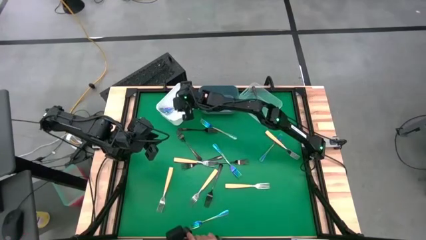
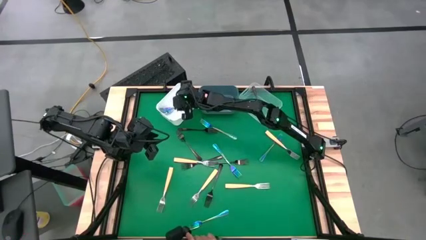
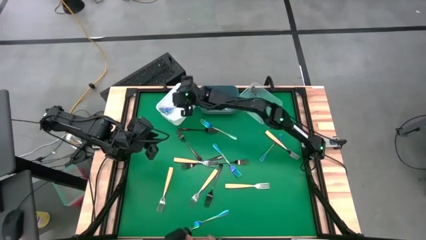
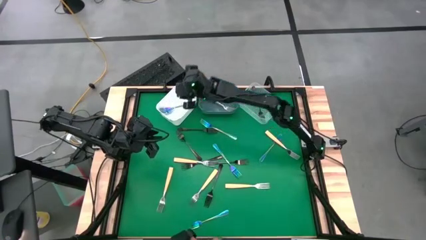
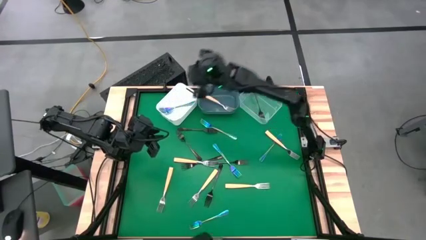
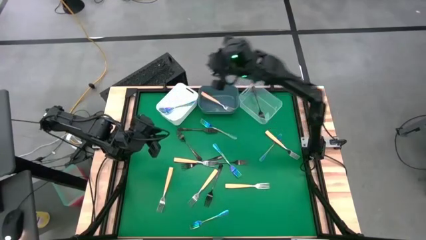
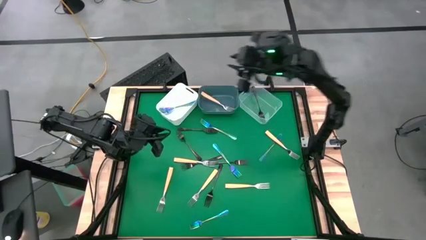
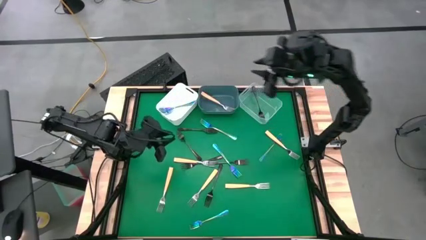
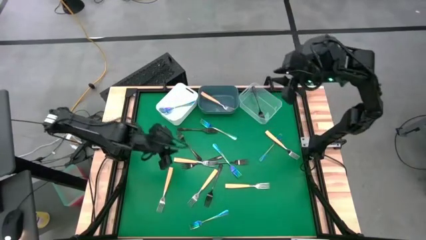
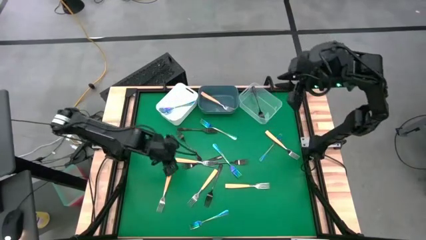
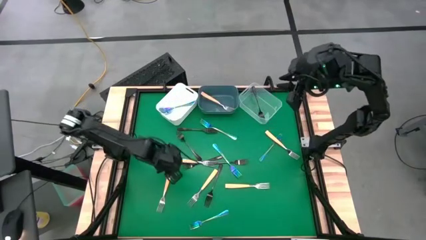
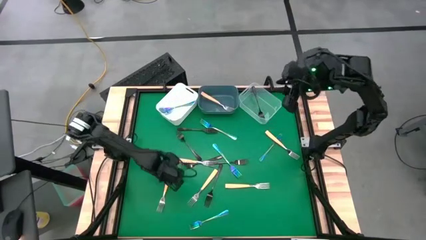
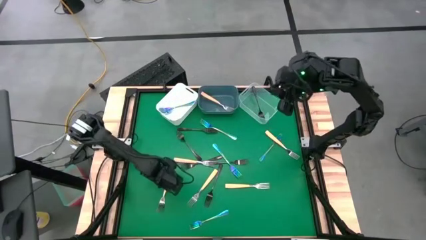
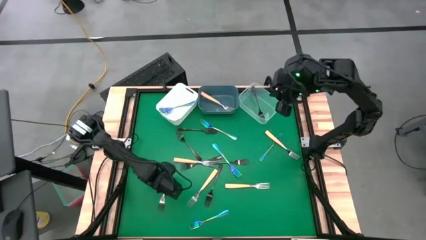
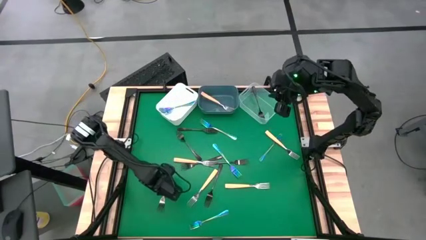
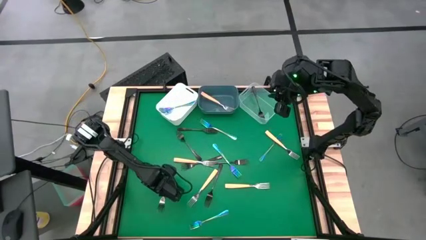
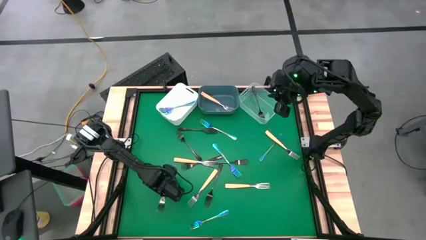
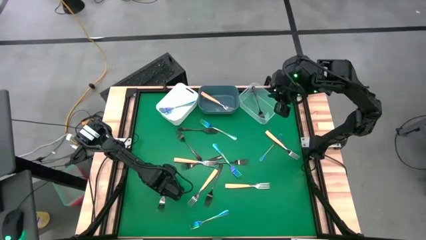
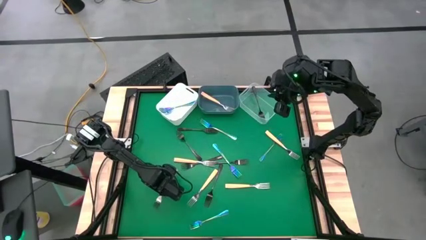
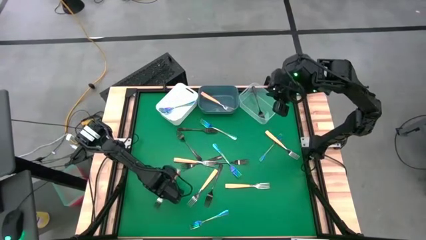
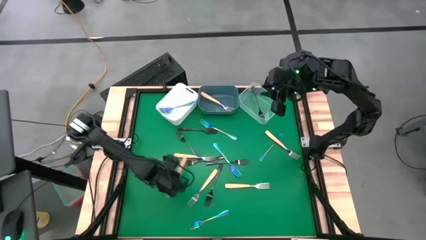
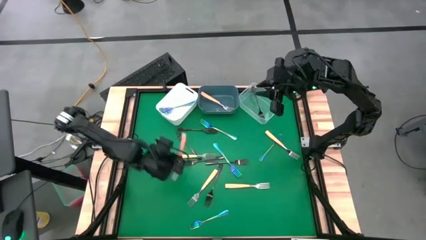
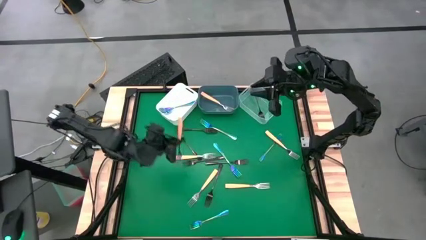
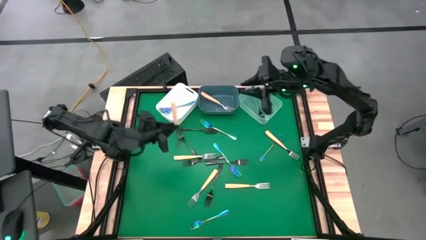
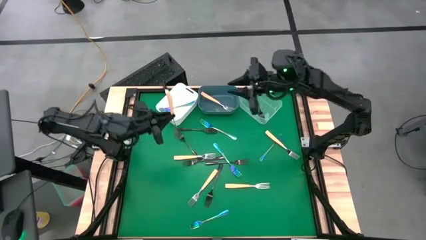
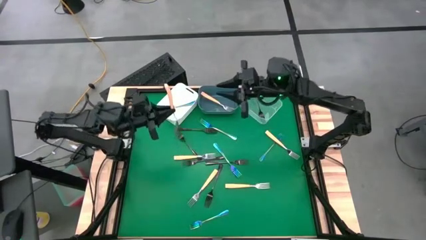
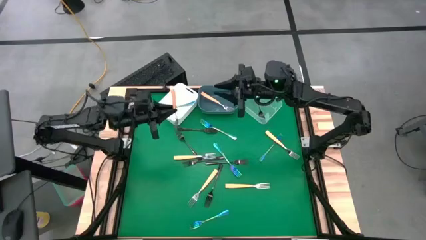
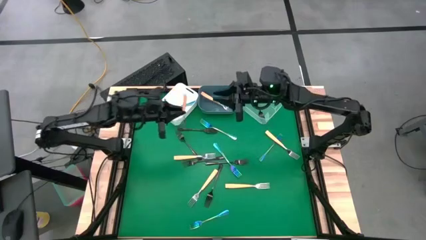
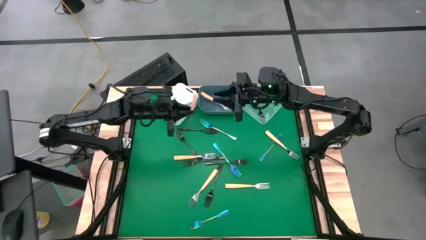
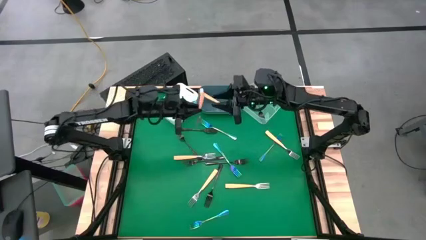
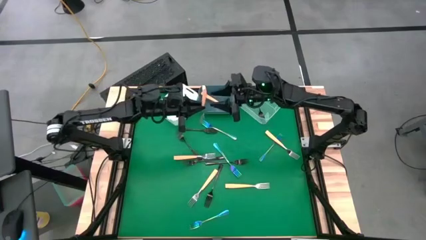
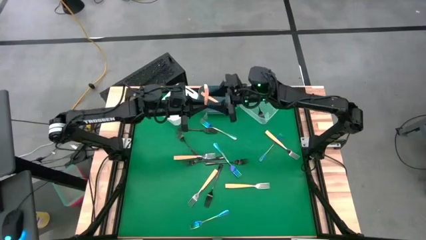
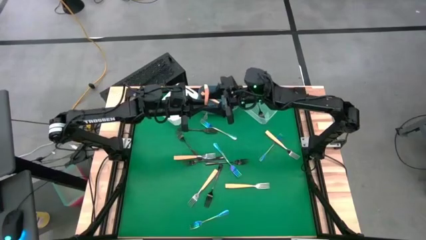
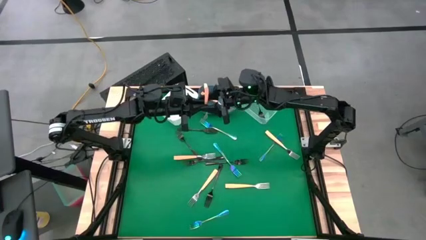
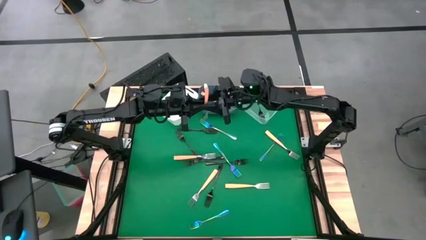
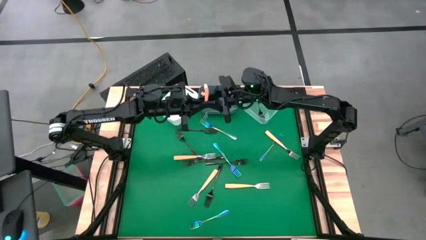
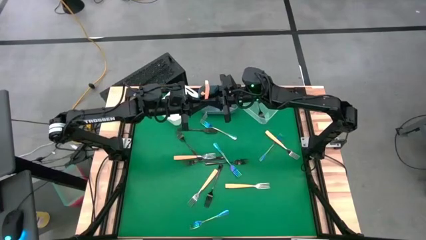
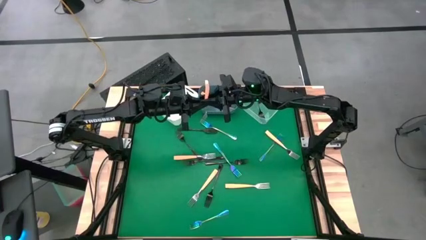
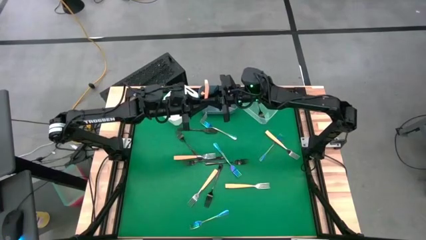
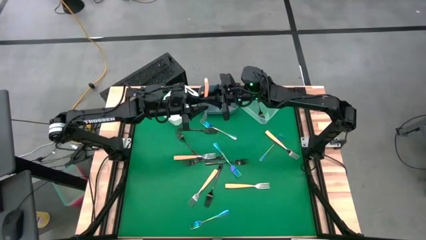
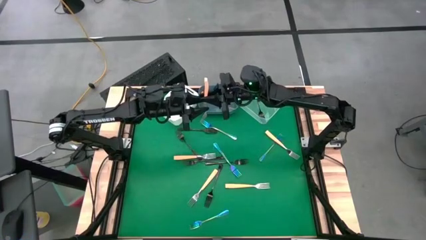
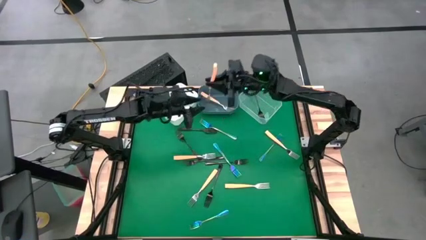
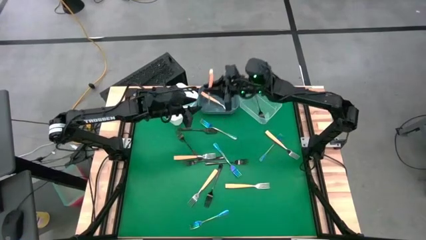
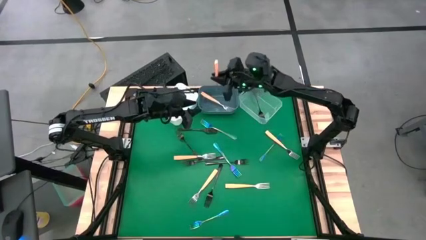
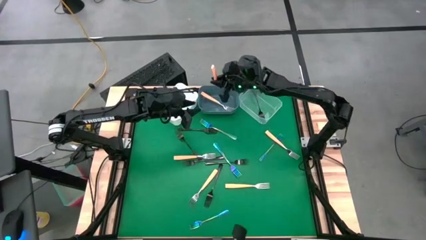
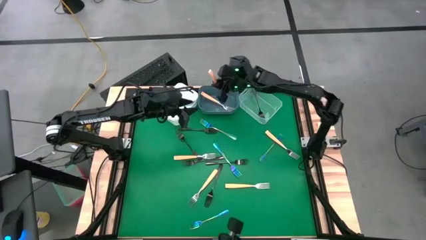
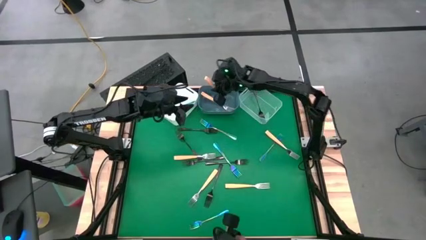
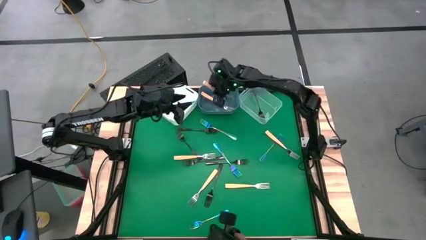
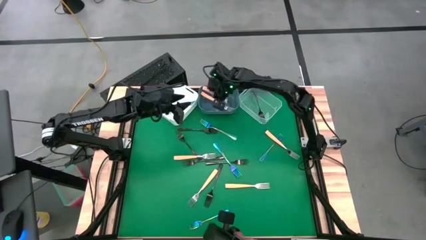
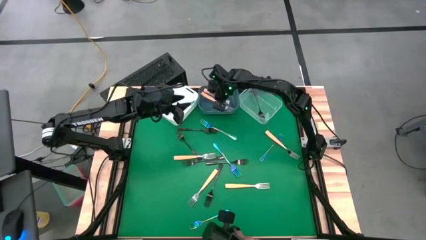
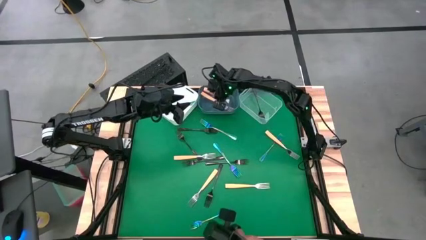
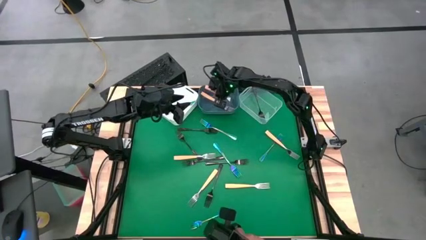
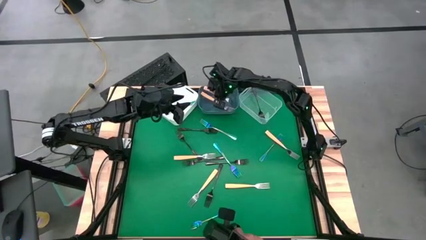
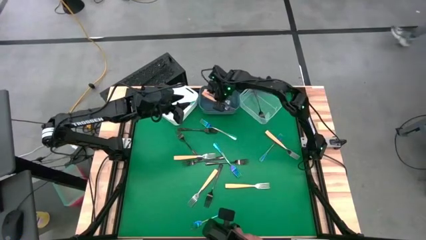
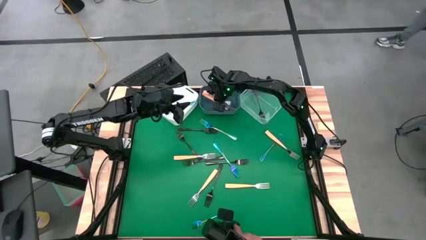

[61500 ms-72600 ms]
Task: Sort silverware by color (type)
Put the yellow fork into the blue bin

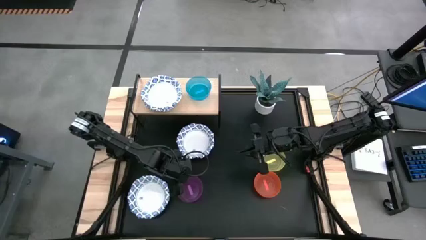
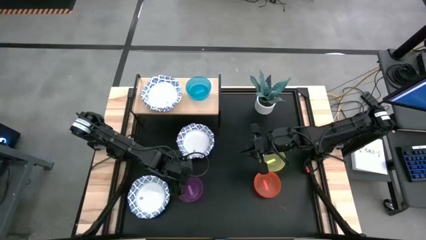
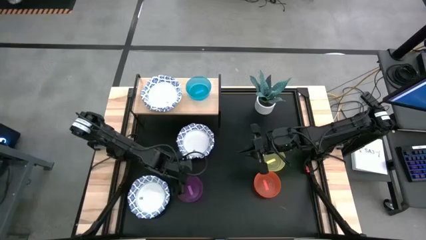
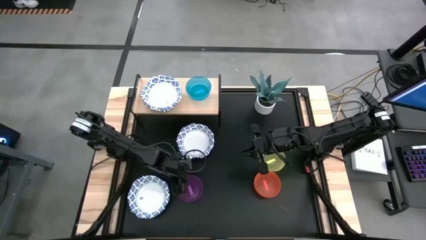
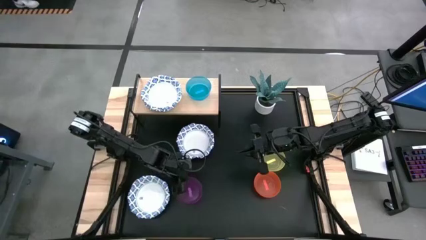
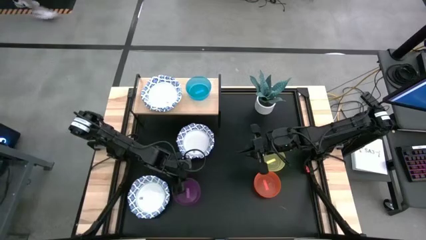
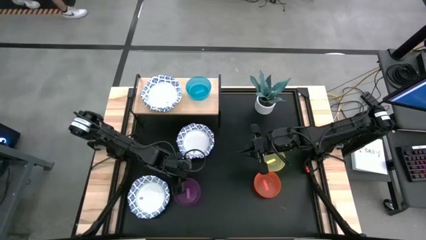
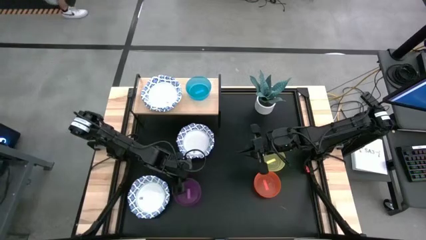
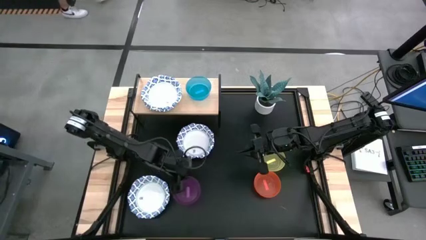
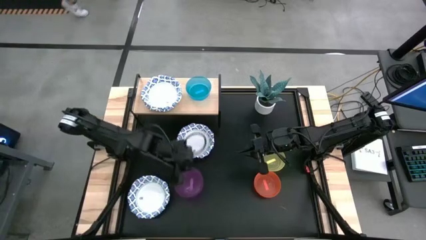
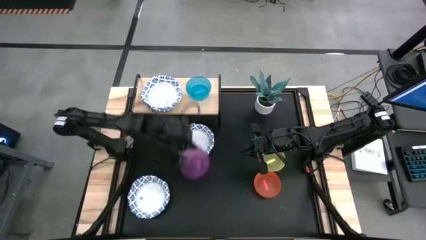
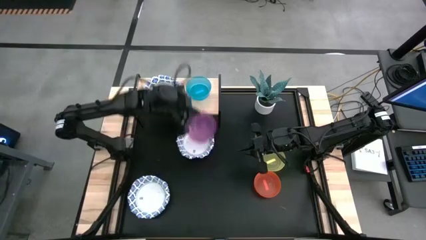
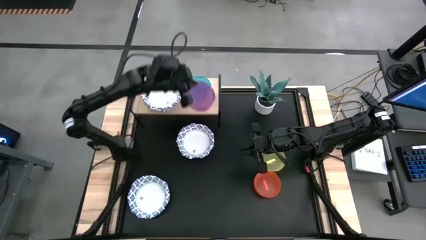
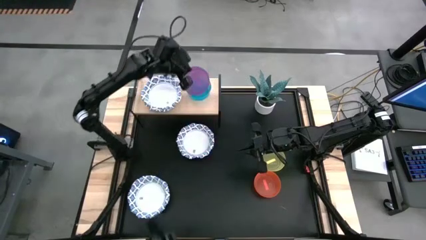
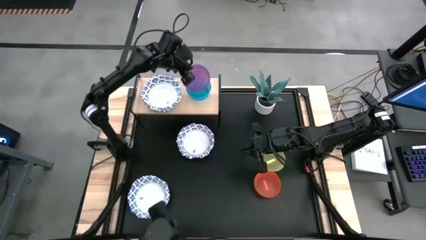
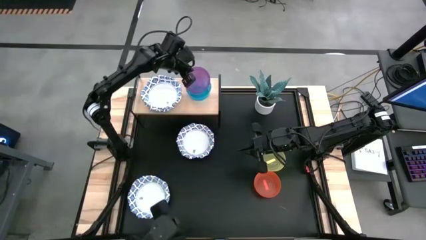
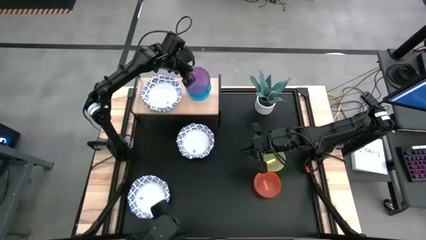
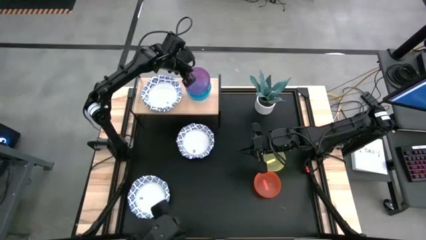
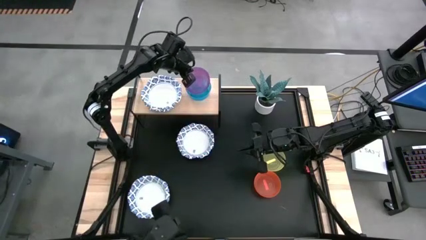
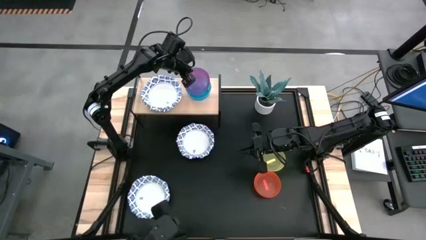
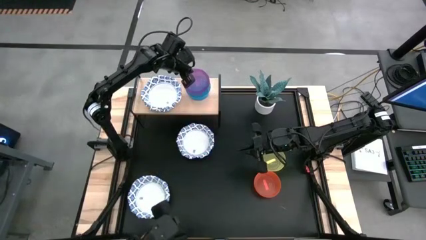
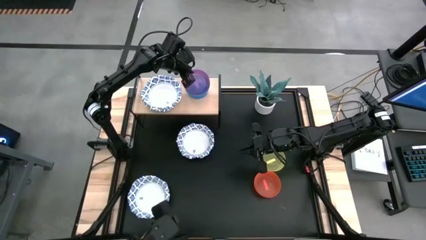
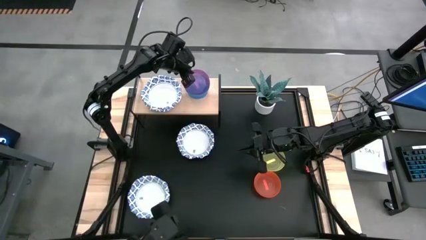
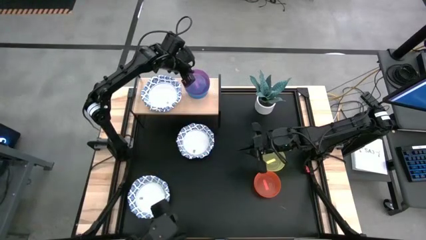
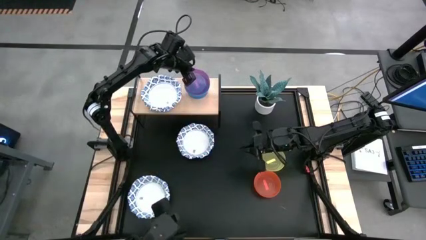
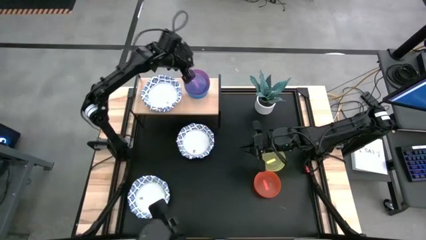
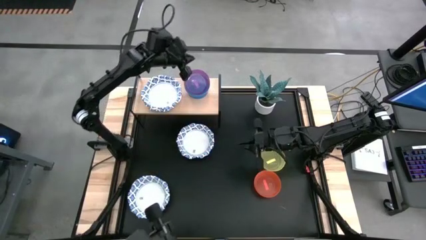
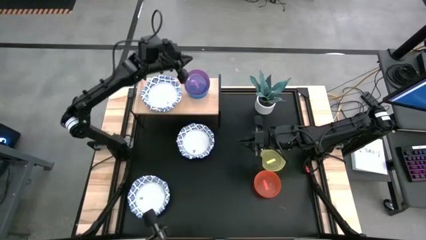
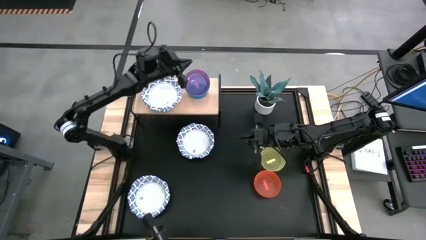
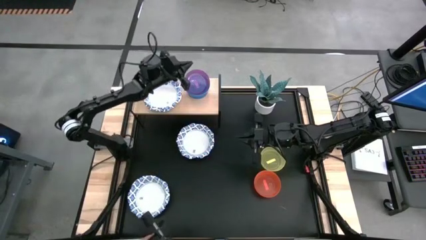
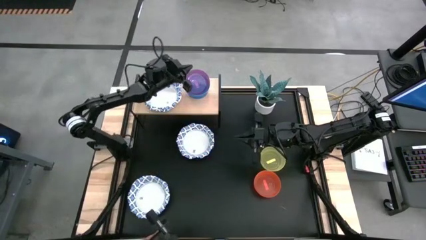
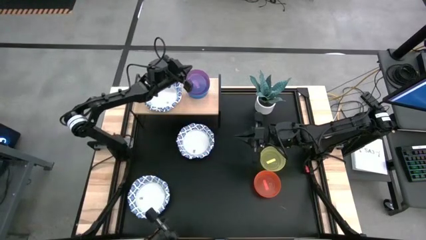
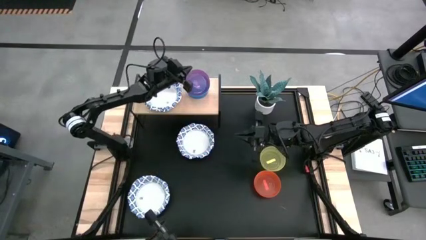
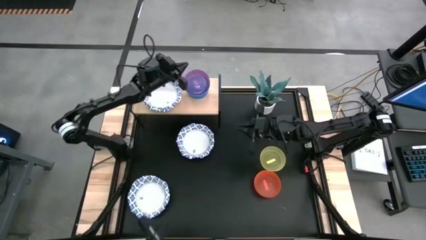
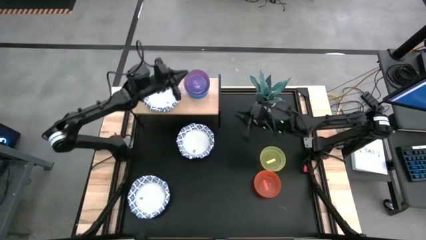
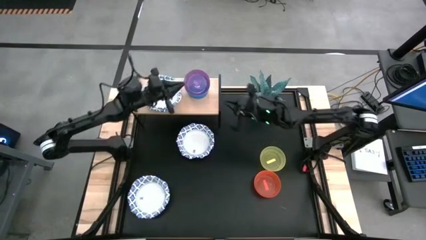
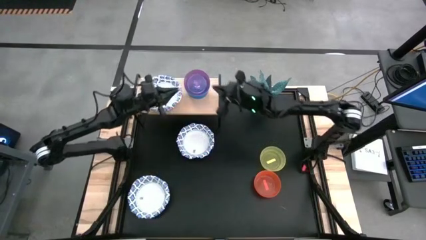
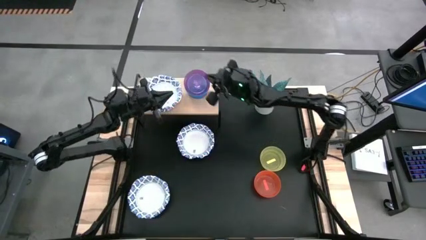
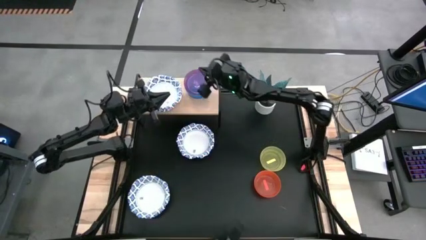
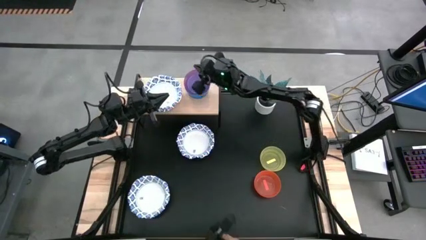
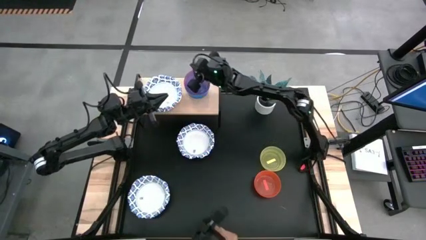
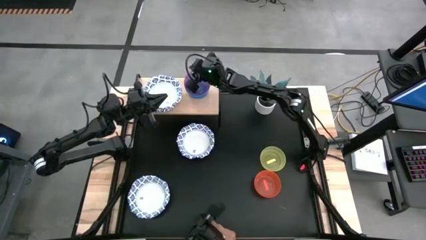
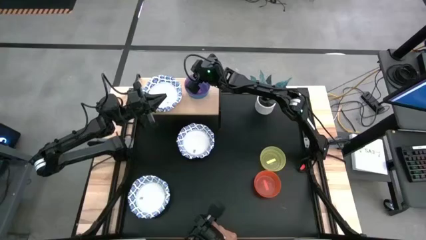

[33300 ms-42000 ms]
Task: Place and stack bowls onto a shelf
Stack the small purple bowl on top of the small blue bowl on the shelf
